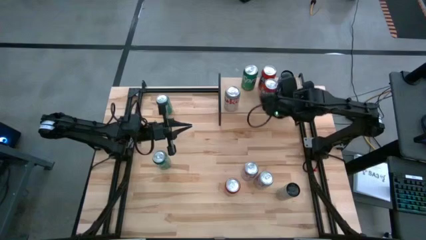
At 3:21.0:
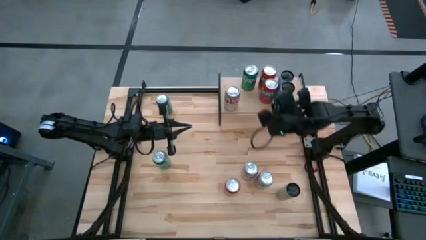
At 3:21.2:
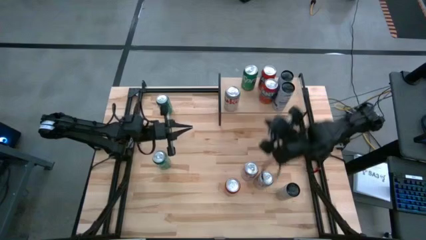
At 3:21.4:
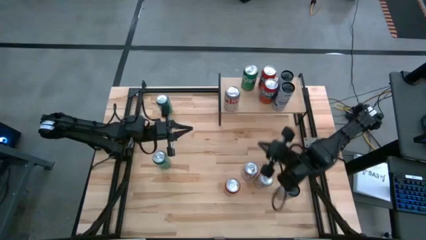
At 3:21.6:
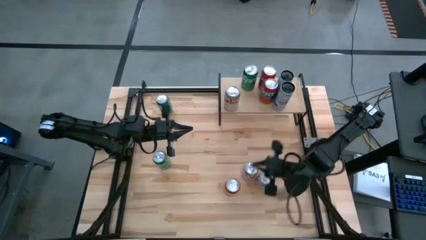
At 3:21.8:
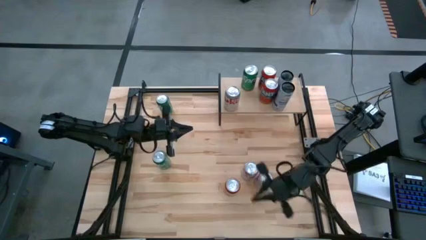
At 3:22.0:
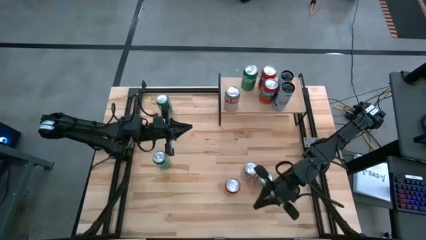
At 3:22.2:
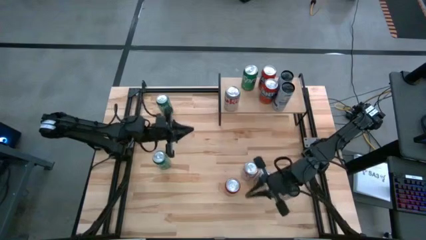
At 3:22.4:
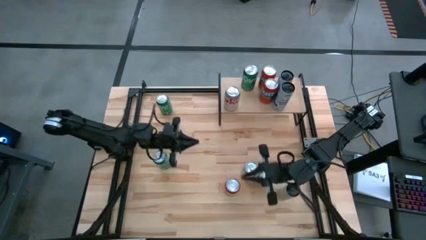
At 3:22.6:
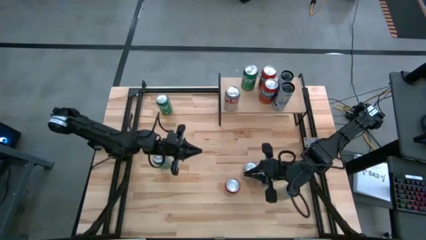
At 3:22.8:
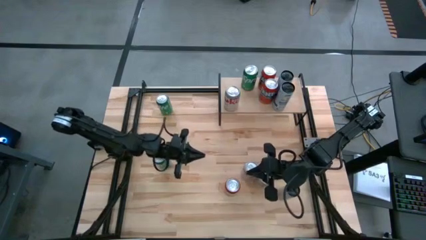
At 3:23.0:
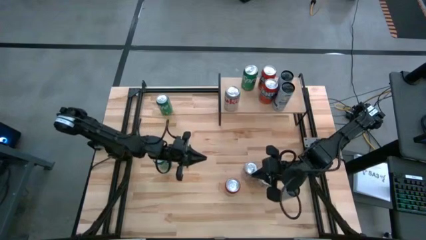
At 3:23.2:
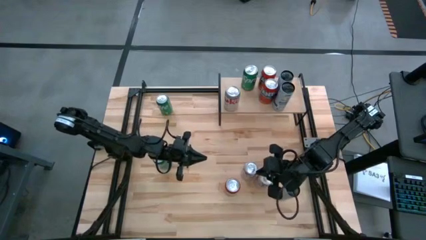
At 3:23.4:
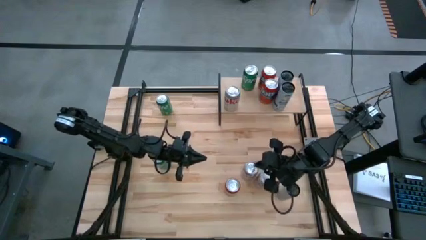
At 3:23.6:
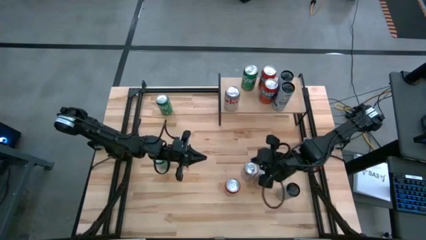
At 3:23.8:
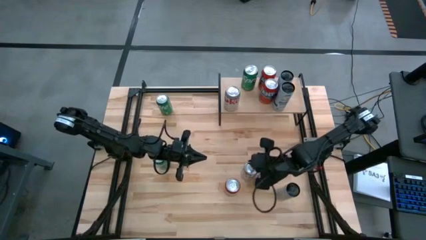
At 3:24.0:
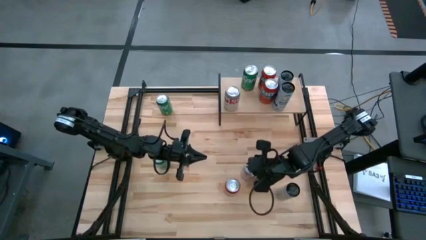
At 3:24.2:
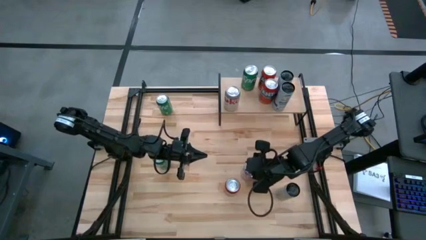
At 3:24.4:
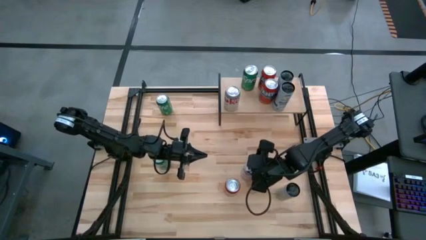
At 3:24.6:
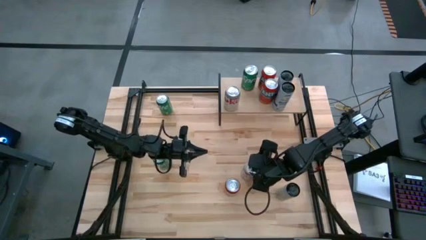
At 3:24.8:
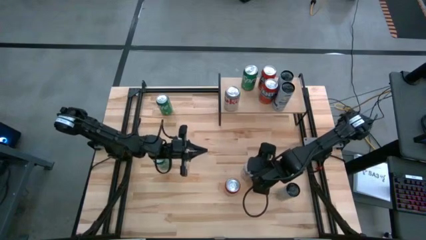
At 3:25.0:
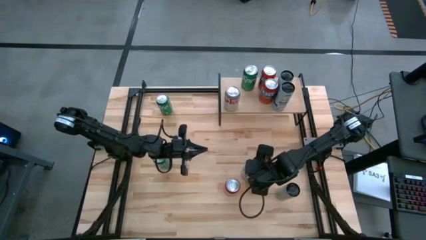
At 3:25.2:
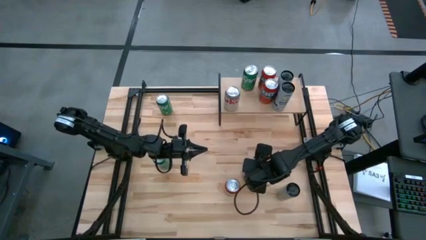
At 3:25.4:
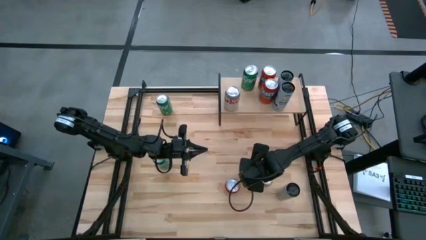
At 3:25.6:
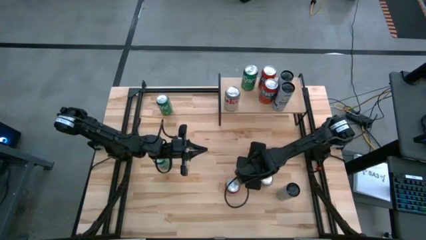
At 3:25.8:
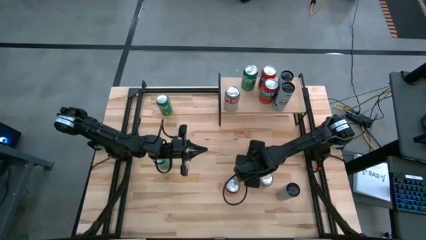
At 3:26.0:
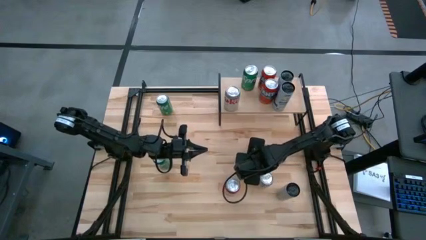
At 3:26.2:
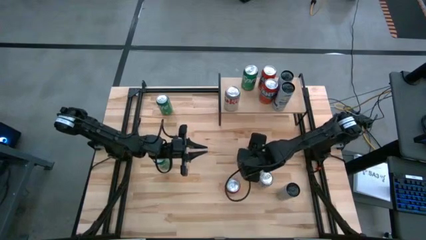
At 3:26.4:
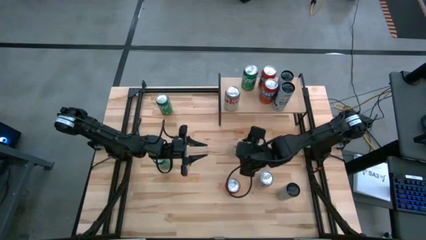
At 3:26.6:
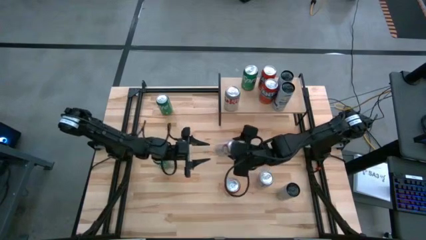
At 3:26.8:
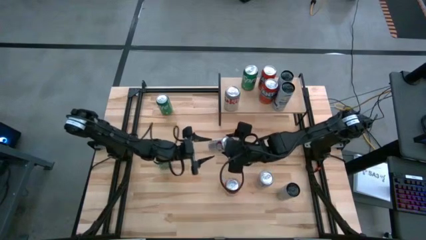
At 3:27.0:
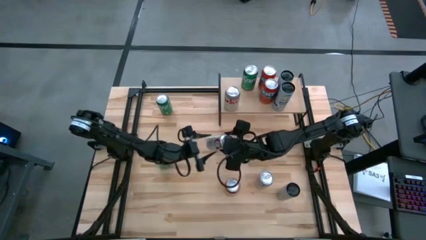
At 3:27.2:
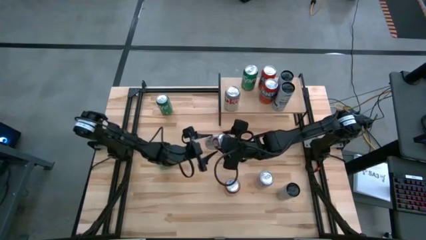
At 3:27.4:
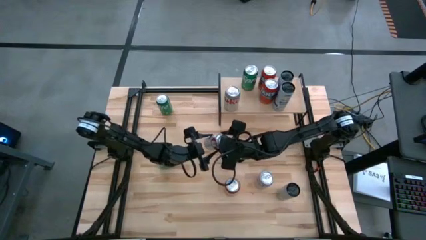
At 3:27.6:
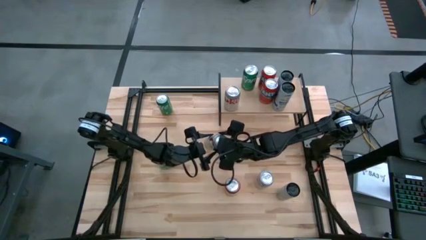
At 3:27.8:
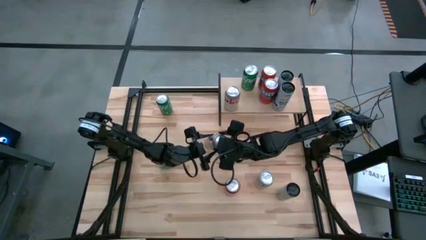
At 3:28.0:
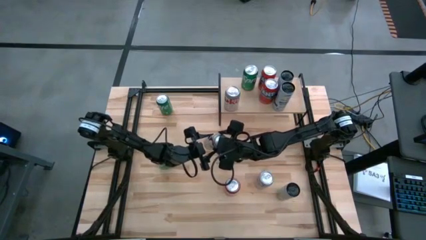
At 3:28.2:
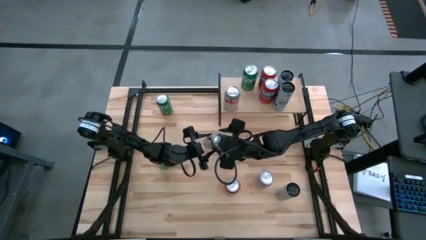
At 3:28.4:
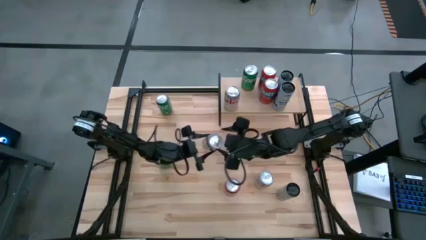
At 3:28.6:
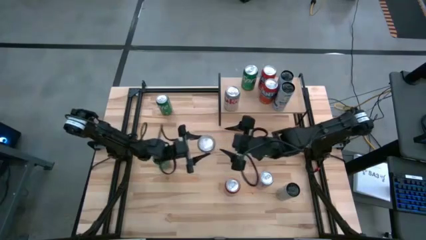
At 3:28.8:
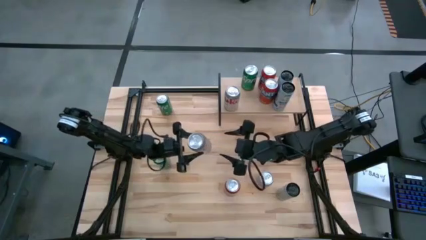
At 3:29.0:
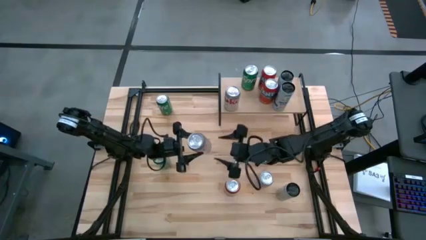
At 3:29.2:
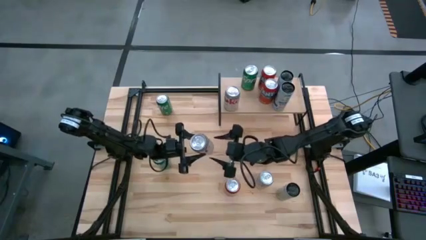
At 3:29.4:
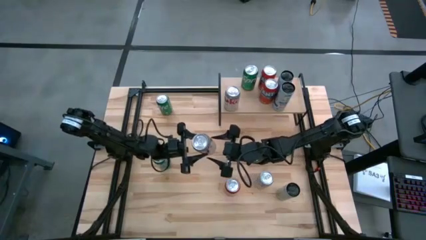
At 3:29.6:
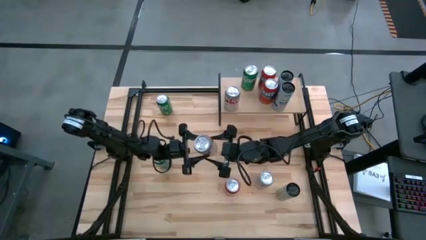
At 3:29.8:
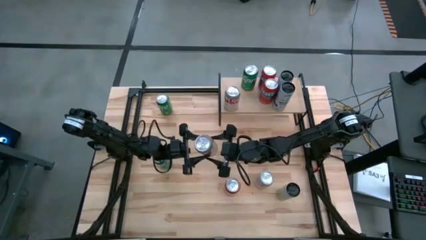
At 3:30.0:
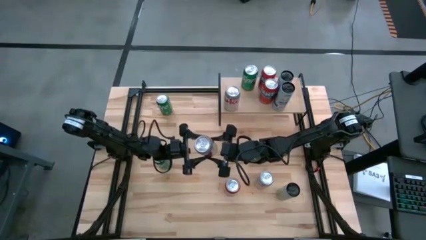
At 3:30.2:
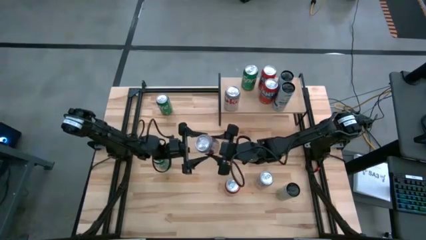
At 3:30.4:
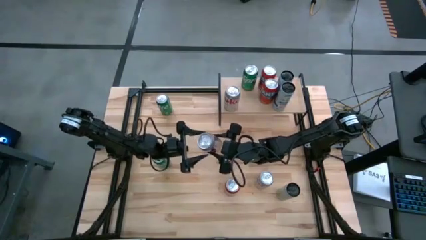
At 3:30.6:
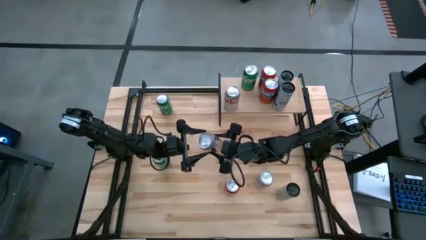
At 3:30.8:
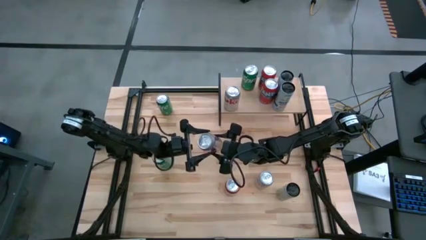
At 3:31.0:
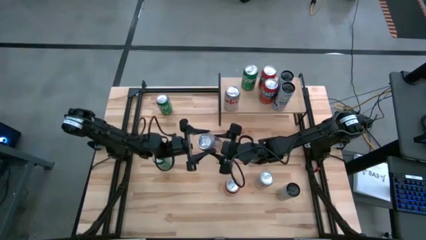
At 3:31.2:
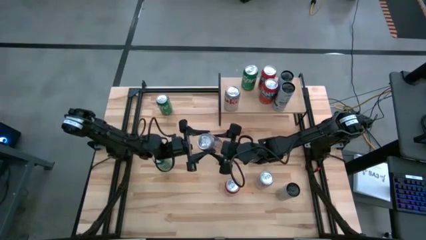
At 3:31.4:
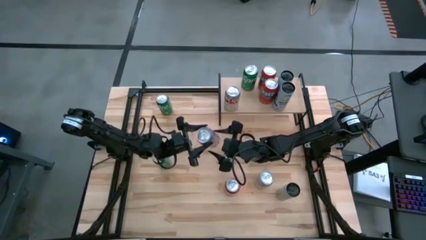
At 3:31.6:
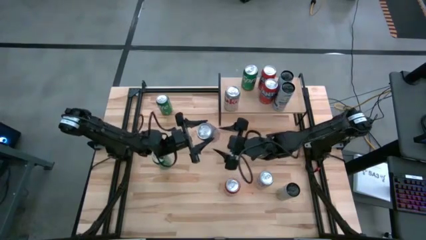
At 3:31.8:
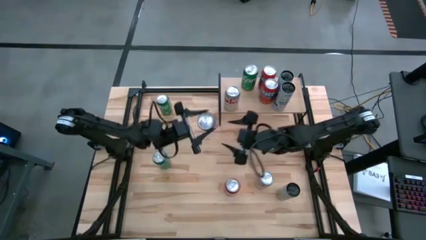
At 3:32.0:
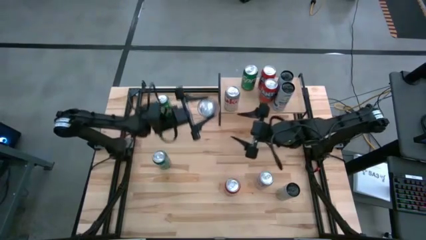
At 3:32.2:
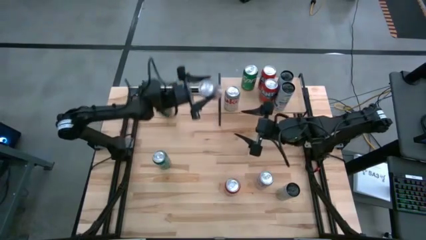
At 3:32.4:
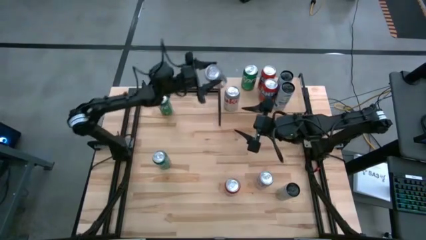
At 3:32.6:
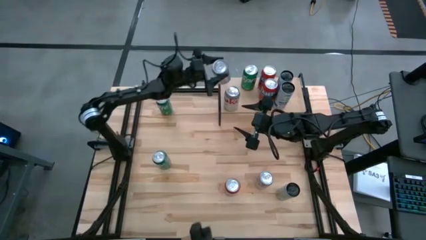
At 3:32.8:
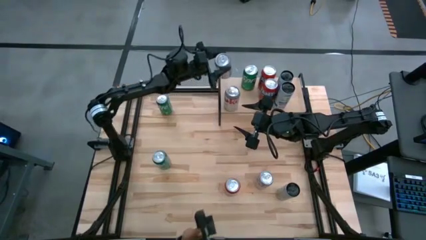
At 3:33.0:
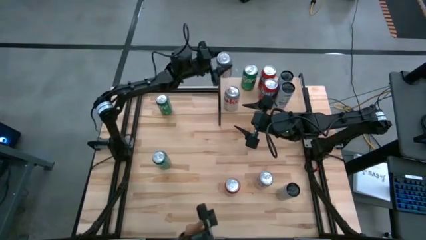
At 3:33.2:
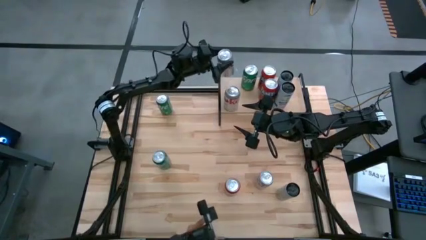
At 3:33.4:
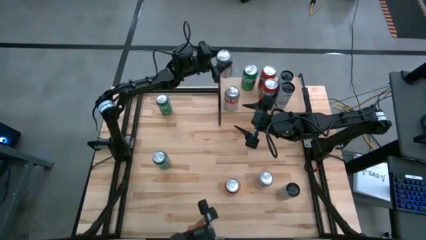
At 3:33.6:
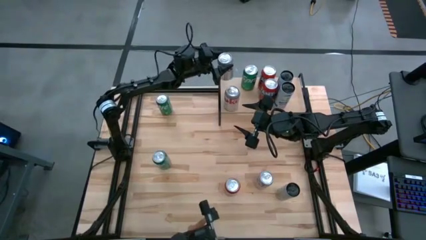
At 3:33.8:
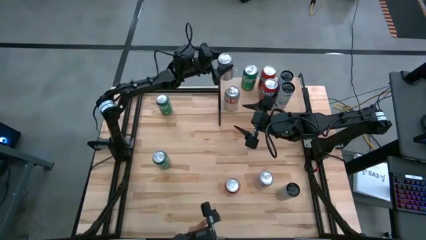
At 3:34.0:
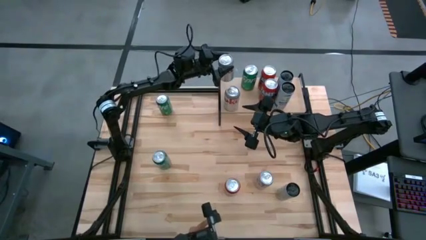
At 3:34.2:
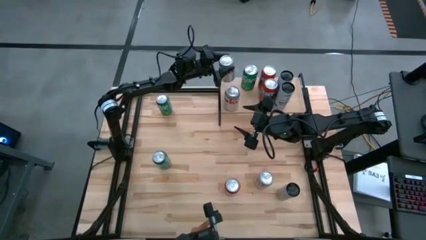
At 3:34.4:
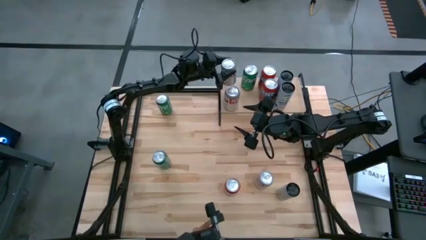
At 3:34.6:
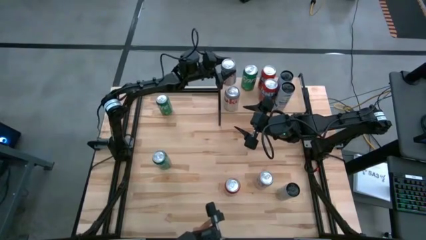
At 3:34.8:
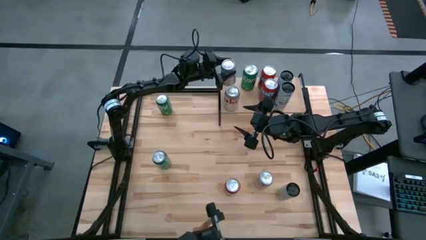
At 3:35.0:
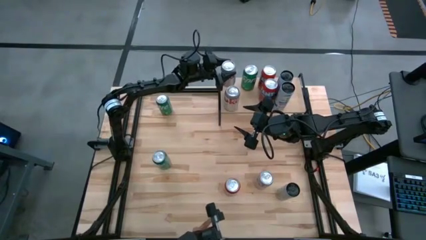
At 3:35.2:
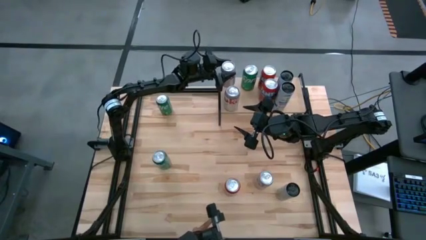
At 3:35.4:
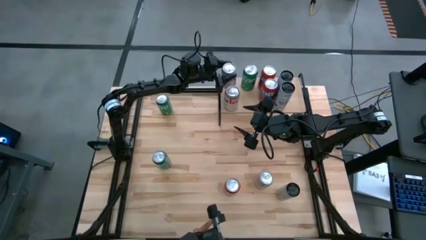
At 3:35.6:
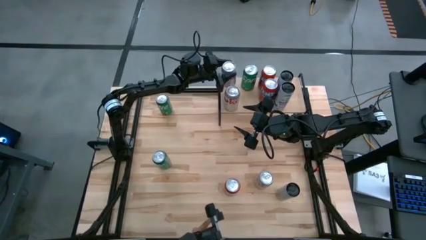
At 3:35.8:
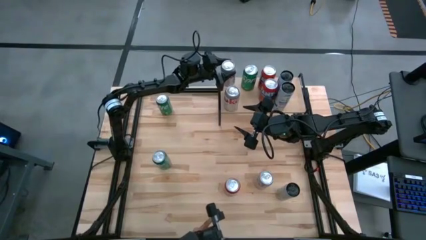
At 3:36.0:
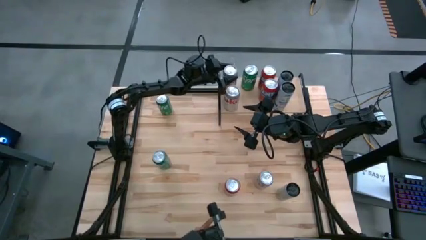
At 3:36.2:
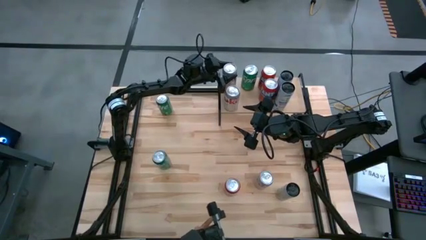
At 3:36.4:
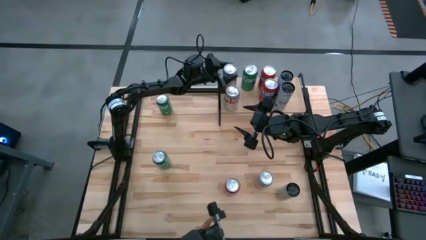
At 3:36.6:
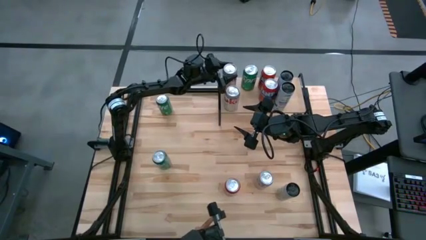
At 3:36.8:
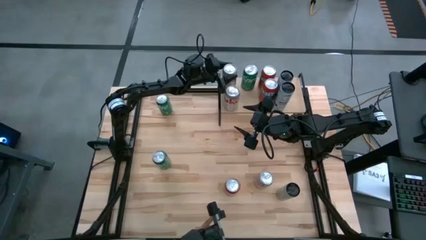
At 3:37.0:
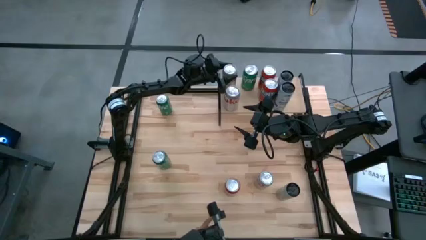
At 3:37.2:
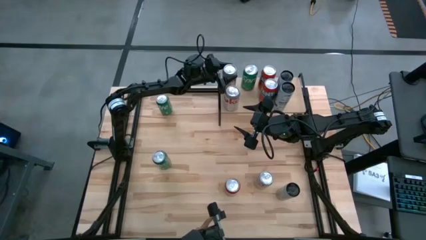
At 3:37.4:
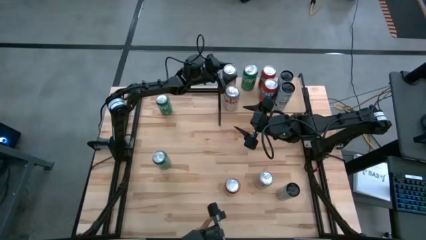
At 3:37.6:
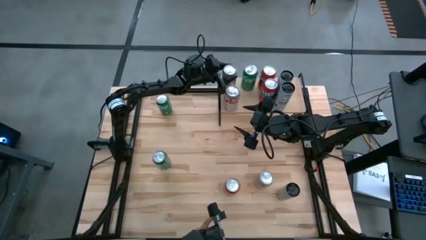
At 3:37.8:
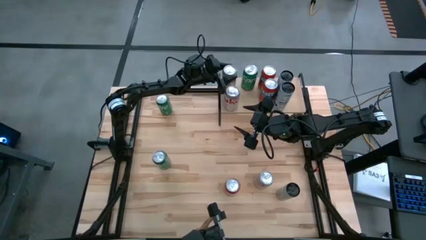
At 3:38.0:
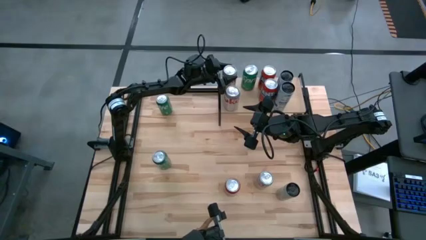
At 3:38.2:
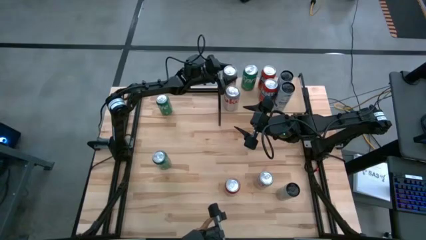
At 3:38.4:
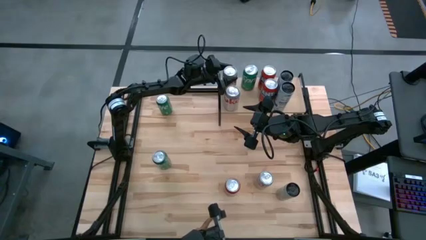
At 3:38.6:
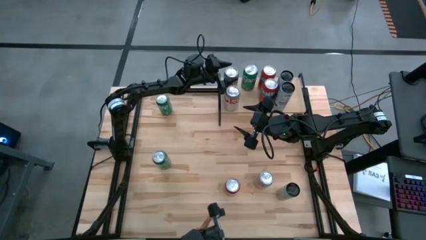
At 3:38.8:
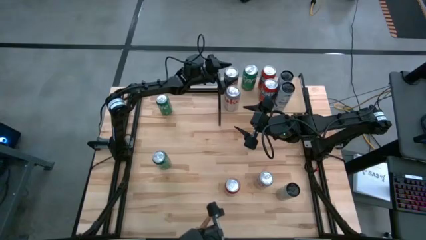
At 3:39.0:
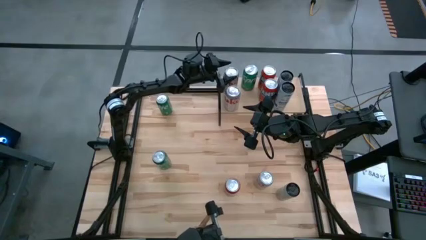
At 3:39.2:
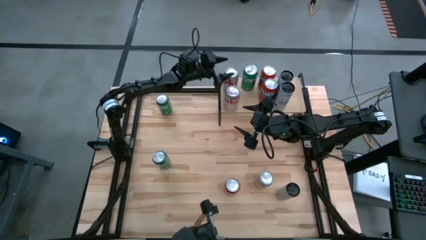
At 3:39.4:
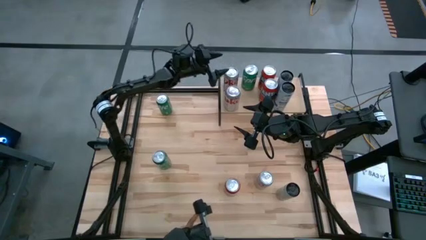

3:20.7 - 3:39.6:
Task: Place canned beverage on shelf
Put the left silver soda can on the back of the shelf aligned with the other silver soda can
